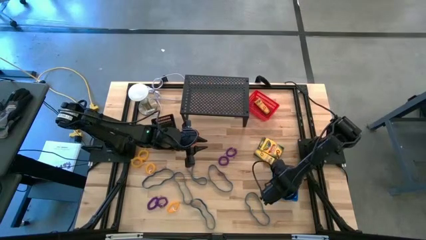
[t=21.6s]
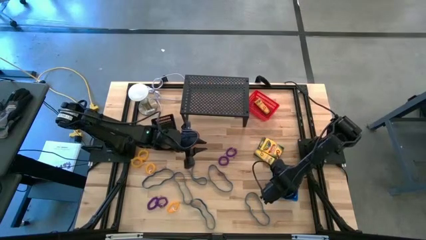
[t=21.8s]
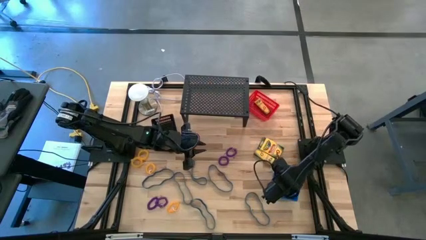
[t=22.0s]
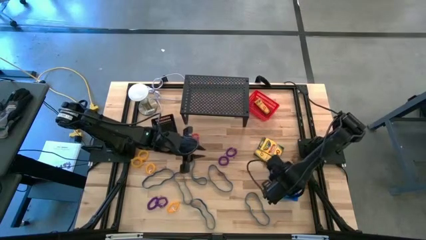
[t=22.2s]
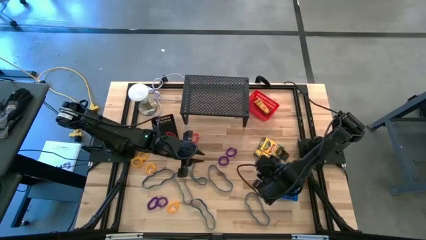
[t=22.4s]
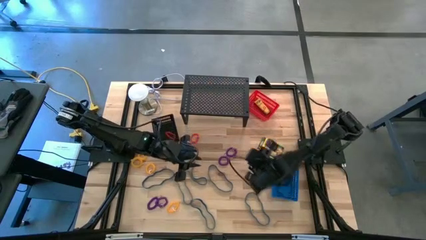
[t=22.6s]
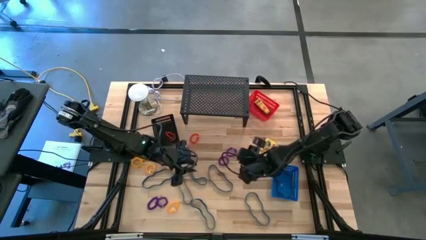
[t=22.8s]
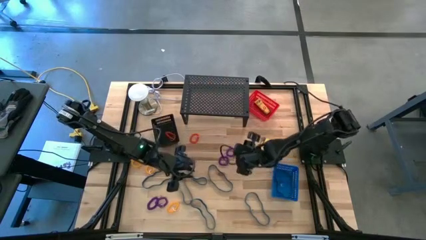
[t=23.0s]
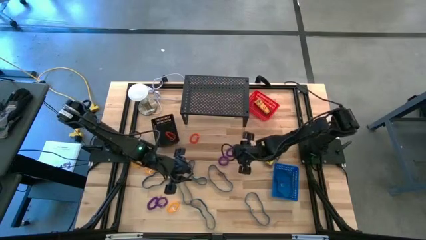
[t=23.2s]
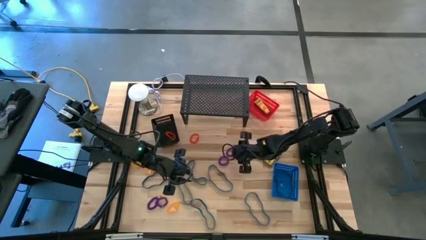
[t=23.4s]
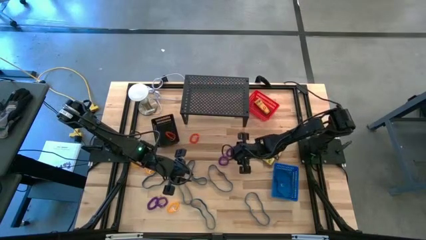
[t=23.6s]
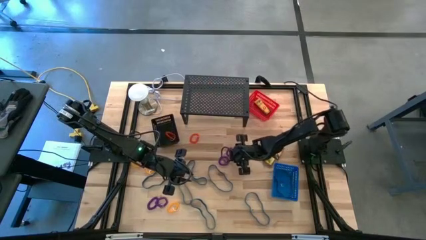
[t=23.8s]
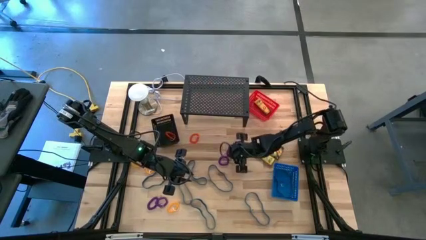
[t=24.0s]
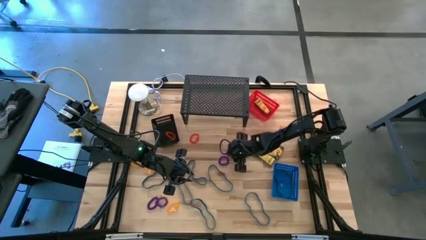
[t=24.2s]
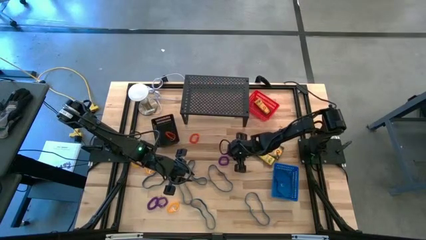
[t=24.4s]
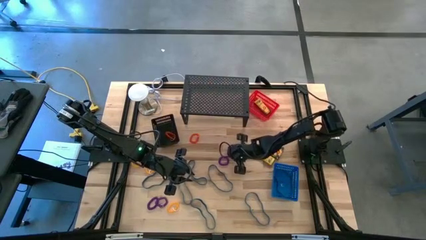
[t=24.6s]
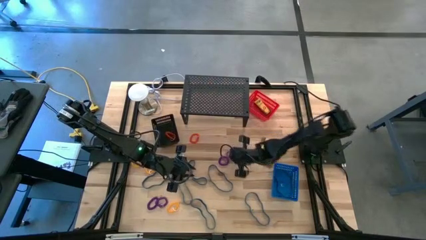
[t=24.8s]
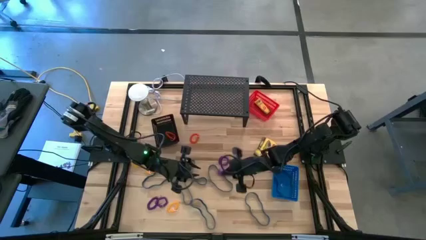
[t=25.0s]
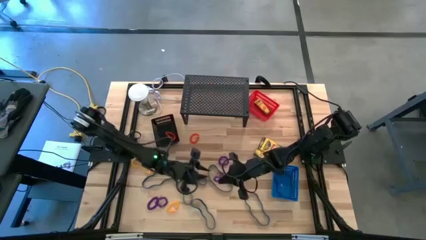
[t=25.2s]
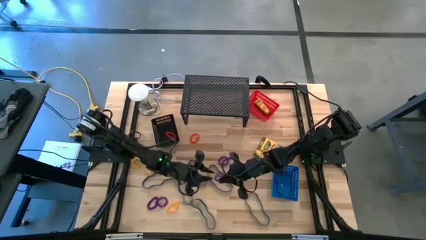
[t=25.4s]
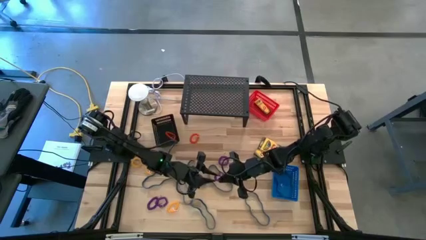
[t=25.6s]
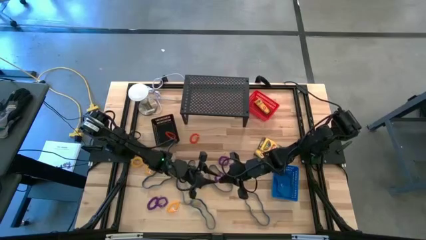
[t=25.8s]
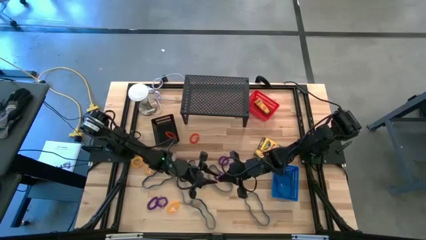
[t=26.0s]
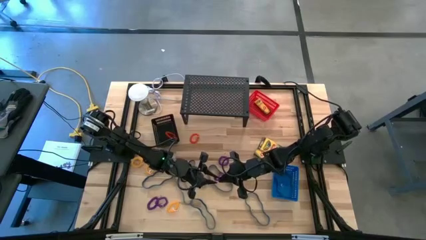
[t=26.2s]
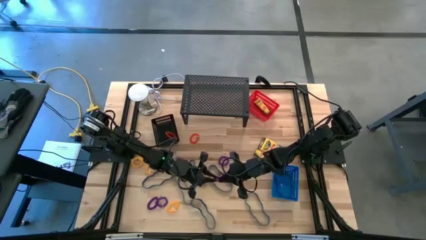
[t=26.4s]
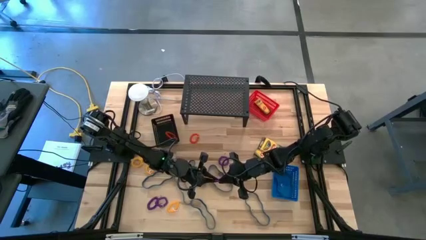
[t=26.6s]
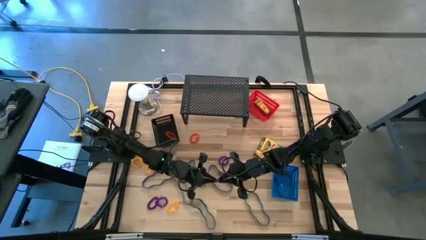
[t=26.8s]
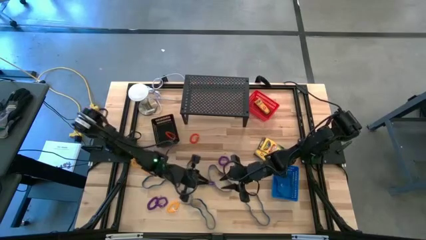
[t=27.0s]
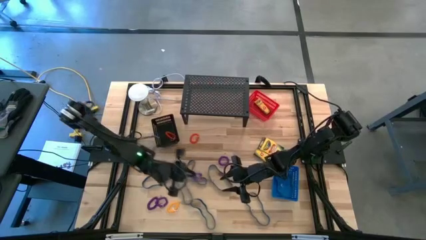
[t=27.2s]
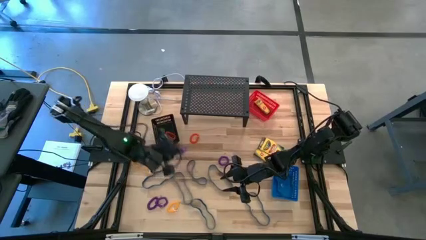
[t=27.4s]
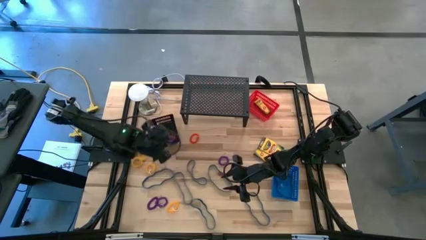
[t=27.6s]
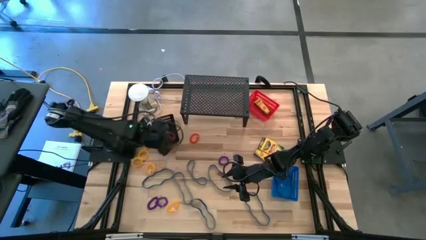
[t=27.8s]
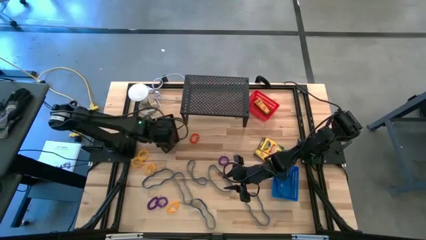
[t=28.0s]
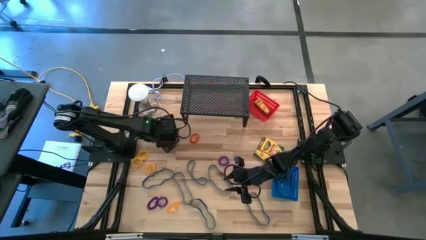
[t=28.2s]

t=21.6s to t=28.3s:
Task: Pick & Place Office Desk Supplies
Put the purple spring keychain into the black basket

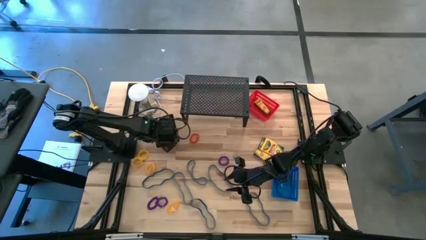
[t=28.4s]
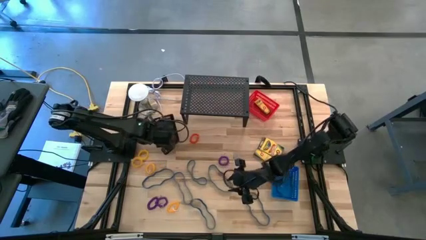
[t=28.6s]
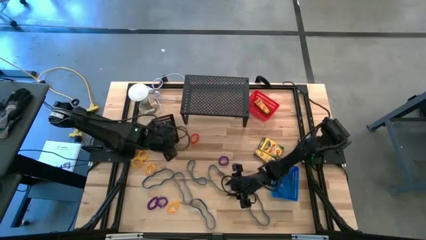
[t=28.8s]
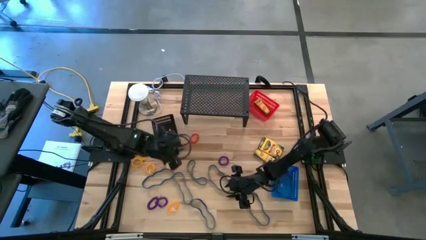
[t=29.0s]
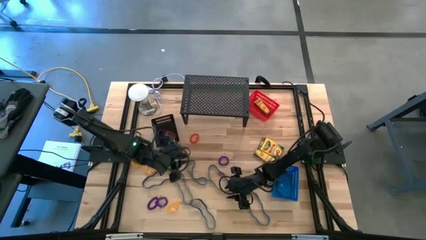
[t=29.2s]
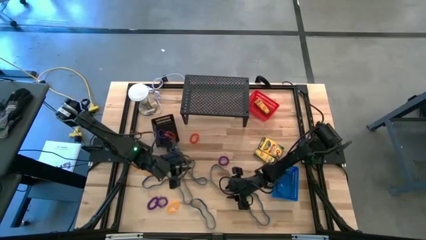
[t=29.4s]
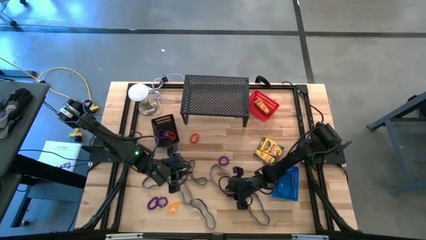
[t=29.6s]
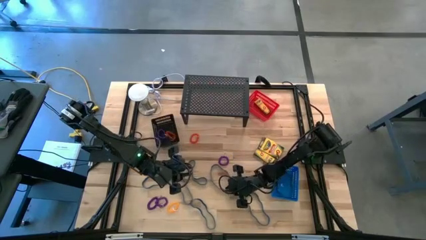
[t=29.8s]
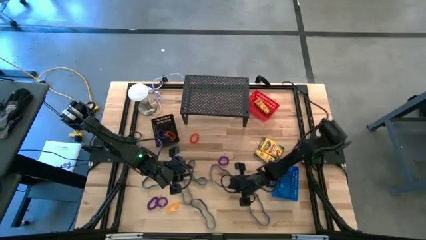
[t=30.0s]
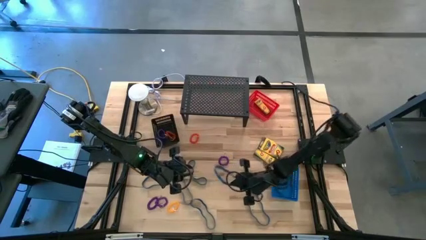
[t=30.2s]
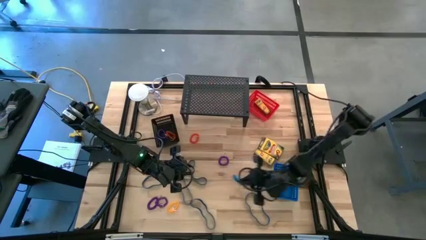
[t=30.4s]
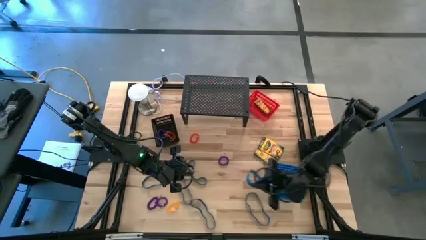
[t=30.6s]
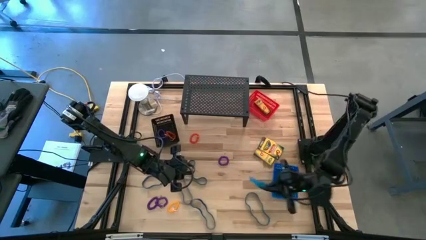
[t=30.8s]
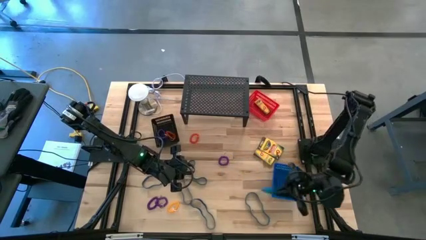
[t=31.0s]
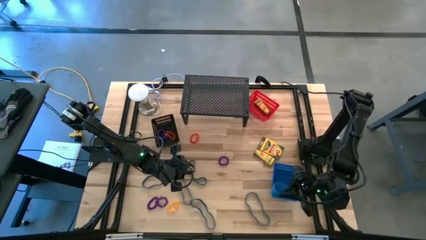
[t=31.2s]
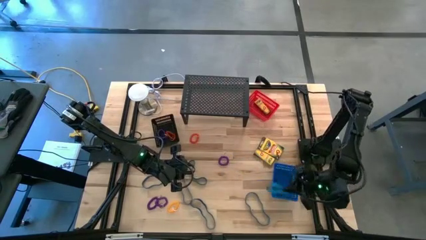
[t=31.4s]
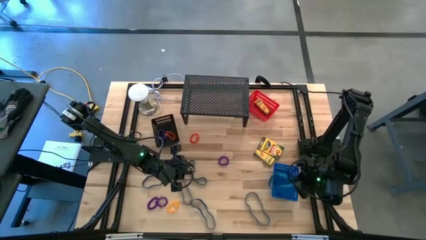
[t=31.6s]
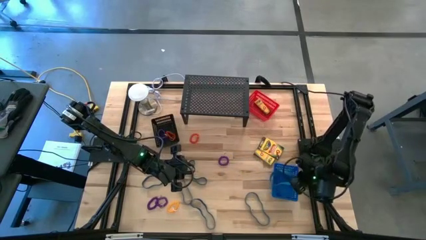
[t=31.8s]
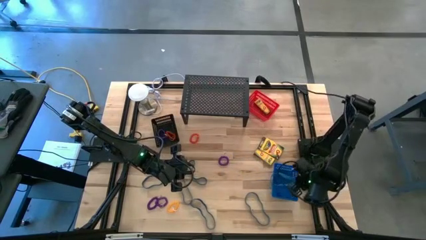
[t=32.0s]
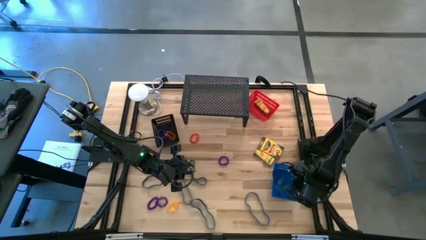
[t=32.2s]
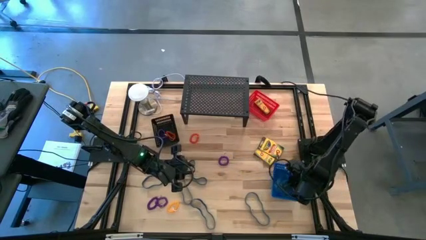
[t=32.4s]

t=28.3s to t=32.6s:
Put the blue rubber band into the blue basket

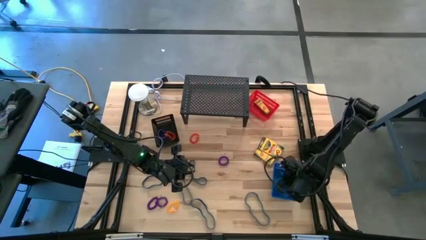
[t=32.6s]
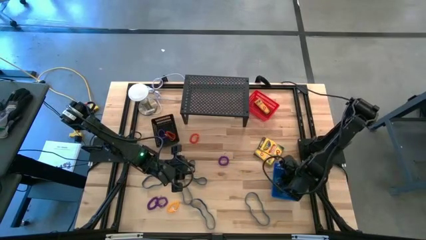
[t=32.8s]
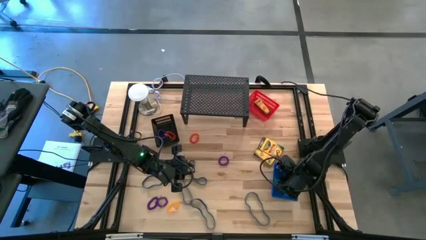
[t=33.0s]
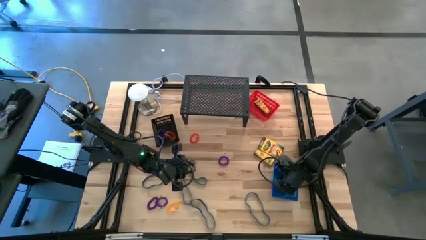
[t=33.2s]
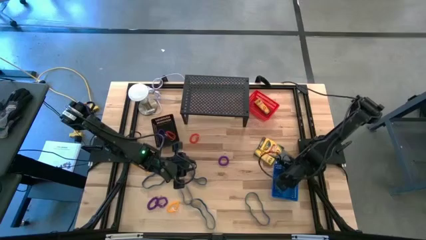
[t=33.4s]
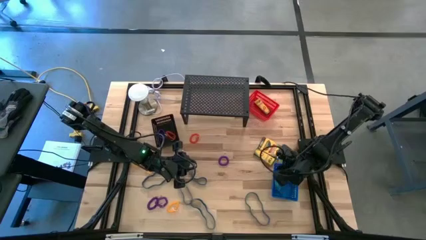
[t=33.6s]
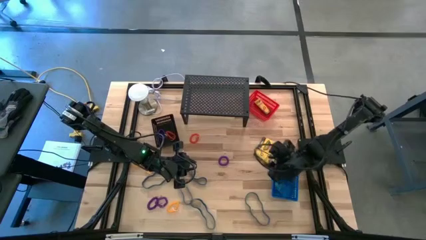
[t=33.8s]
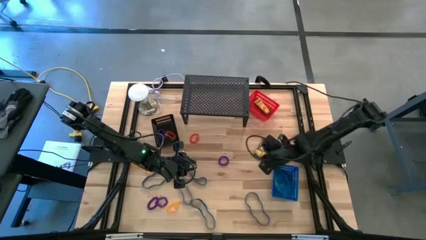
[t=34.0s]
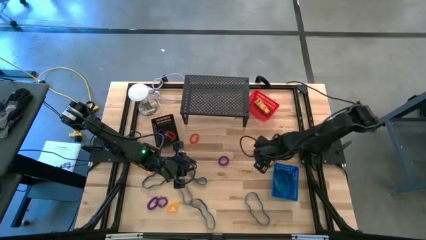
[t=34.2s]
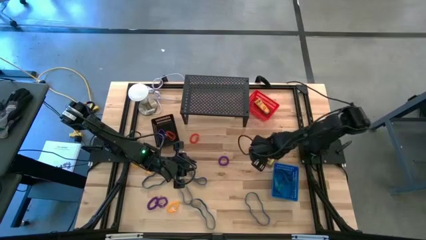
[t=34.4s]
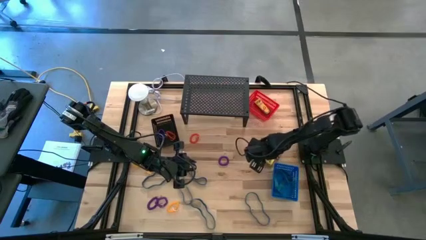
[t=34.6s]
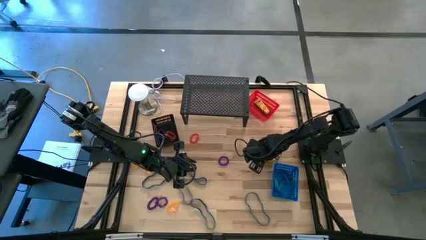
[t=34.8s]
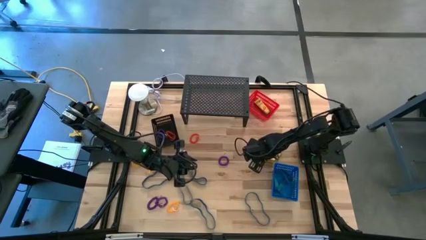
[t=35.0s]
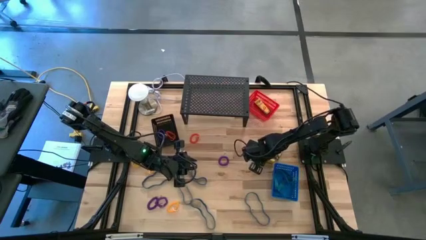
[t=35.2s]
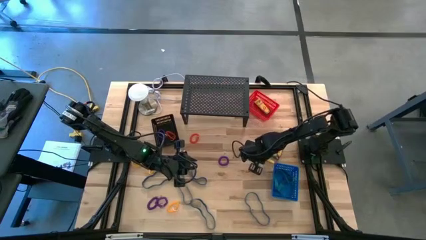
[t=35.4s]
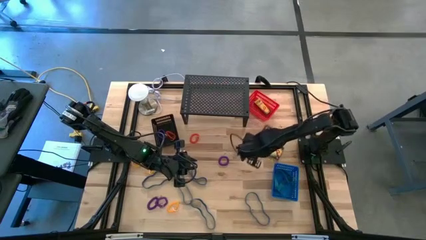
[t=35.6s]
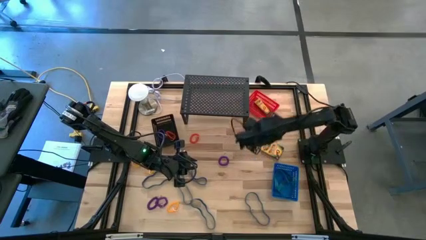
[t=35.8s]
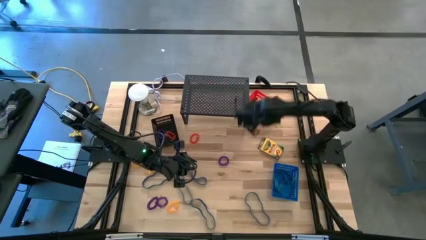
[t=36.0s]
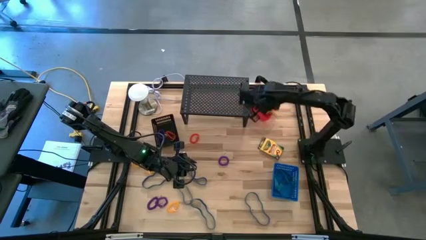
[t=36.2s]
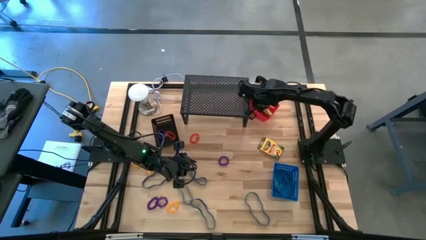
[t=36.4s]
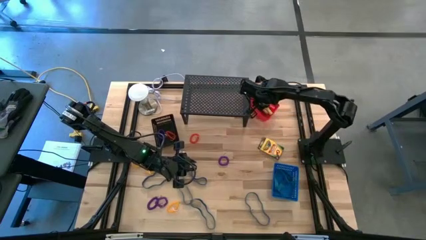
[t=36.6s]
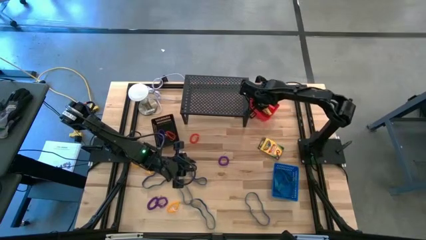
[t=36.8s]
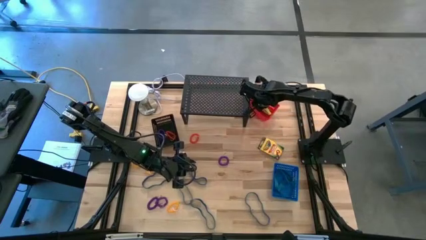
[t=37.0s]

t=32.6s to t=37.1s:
Put the big crayon box into the red basket
